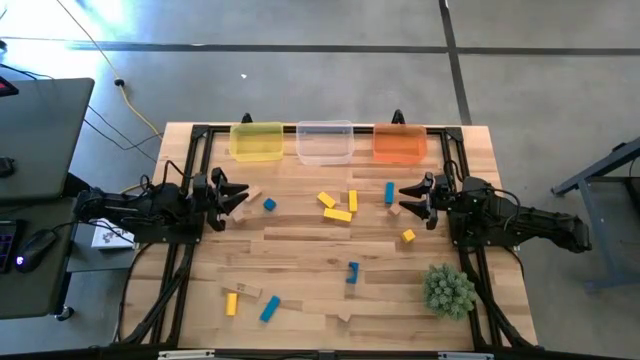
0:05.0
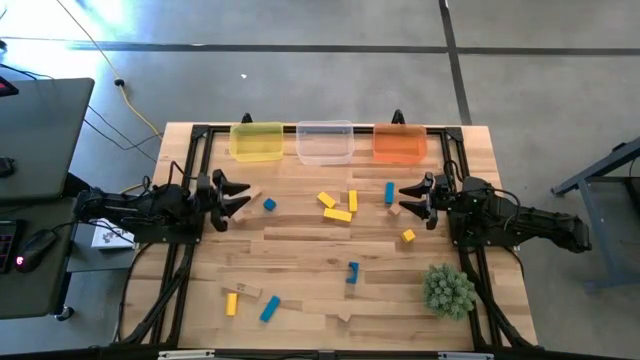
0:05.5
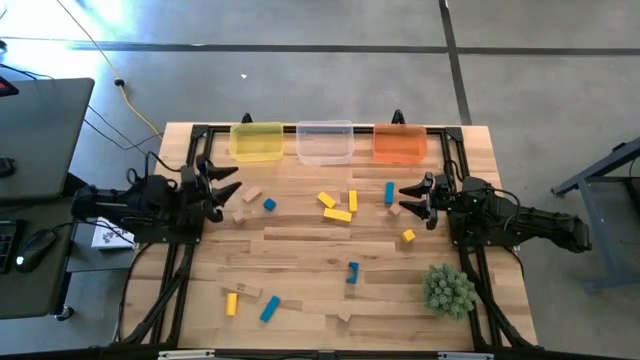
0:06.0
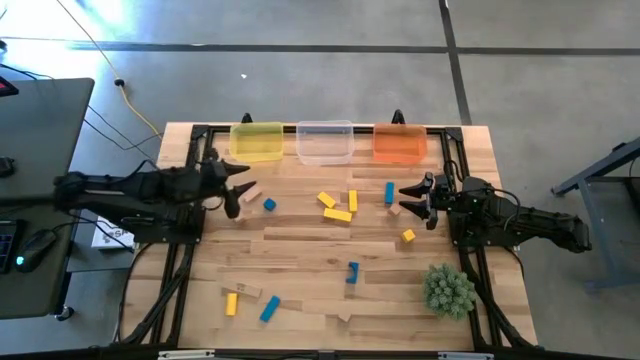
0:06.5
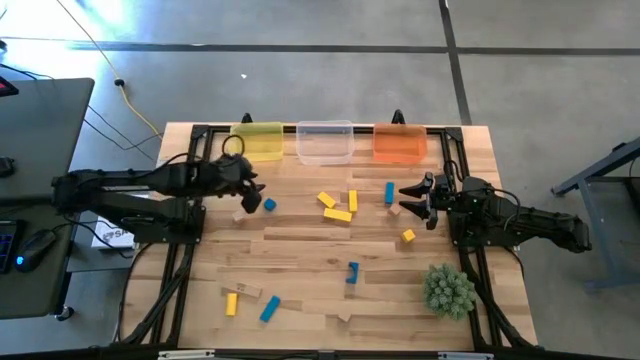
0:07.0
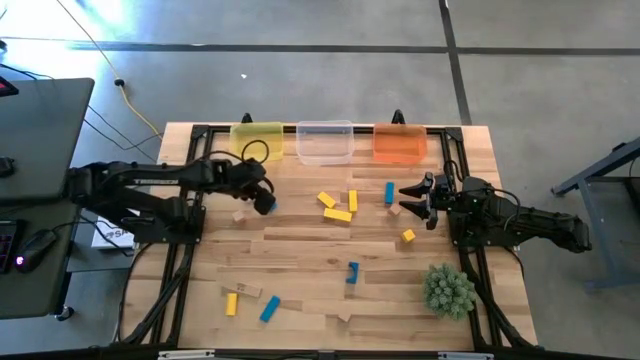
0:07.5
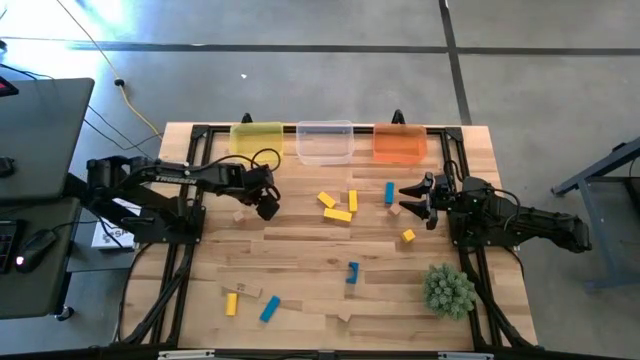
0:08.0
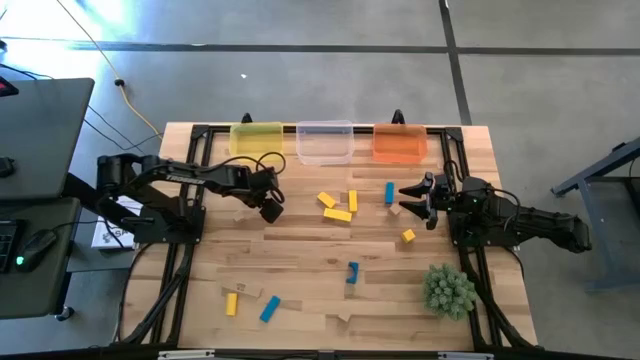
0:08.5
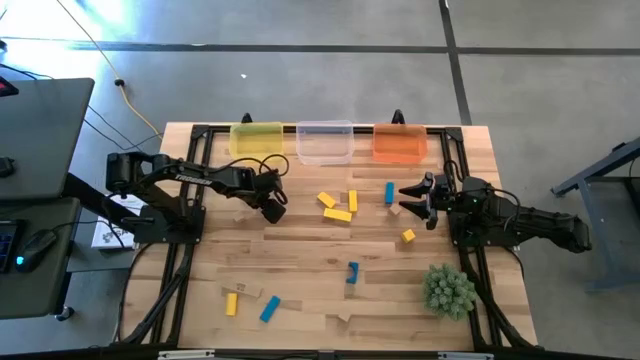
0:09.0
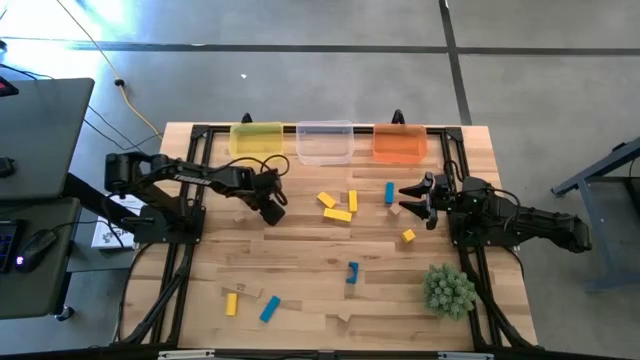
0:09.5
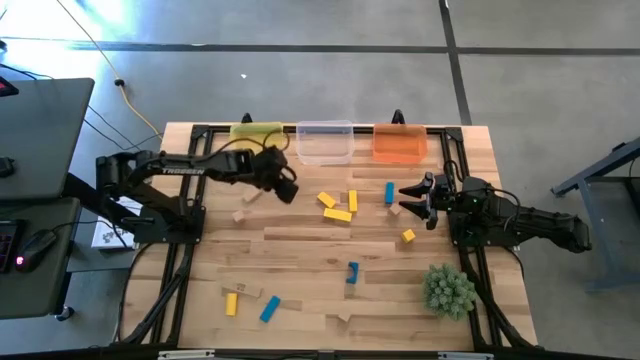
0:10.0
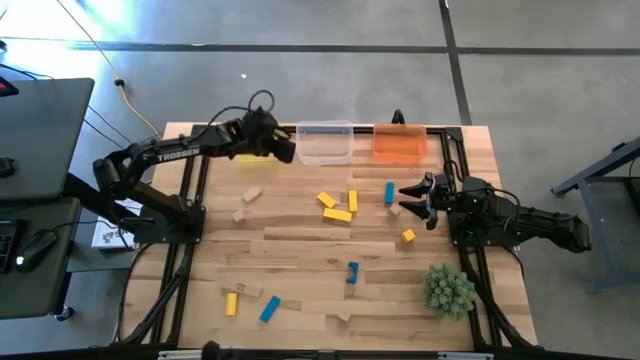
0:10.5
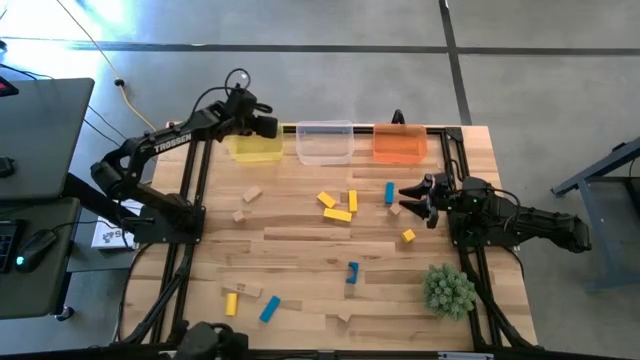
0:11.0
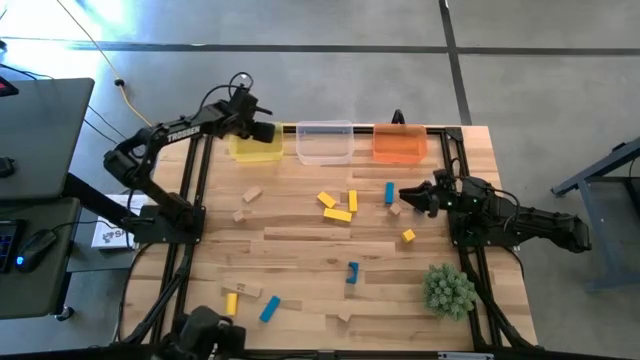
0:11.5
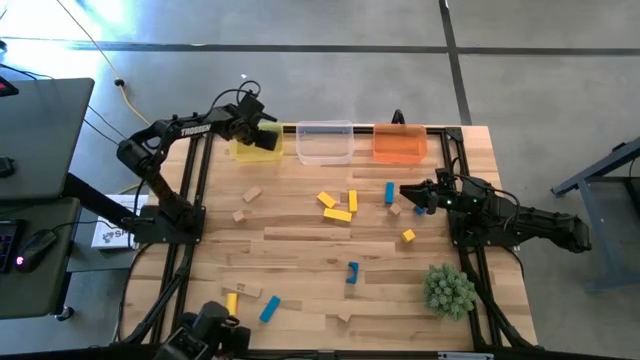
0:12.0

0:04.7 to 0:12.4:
Task: Sort & place blocks by color
Put the blue block into the yellow bin

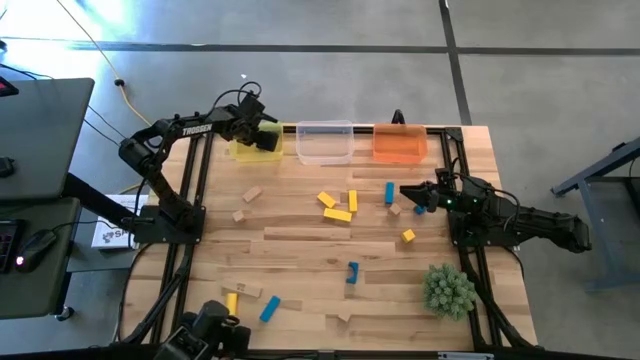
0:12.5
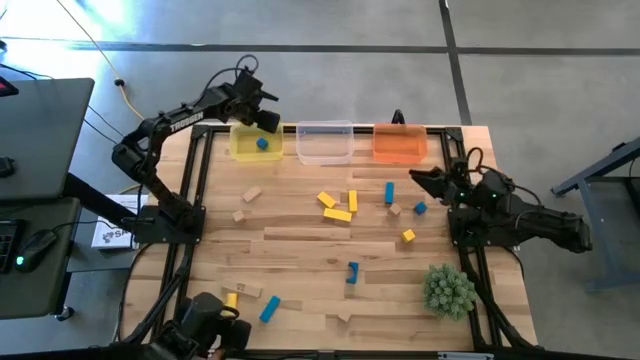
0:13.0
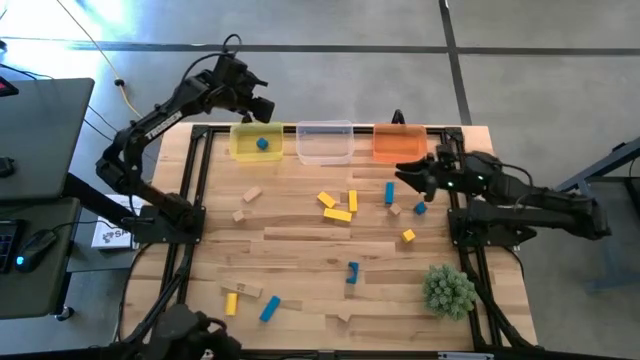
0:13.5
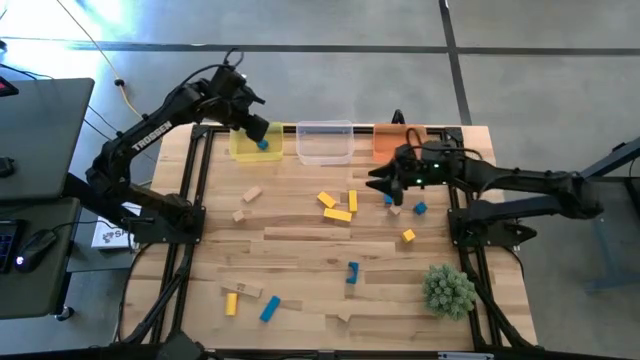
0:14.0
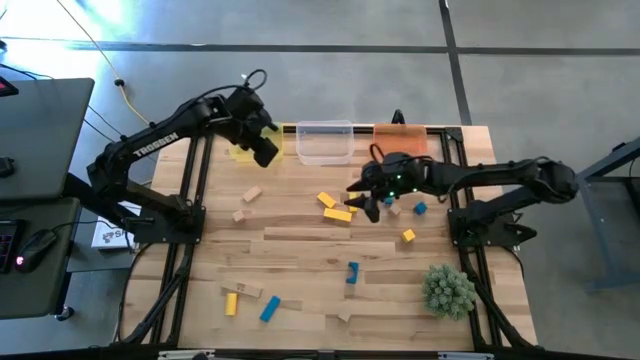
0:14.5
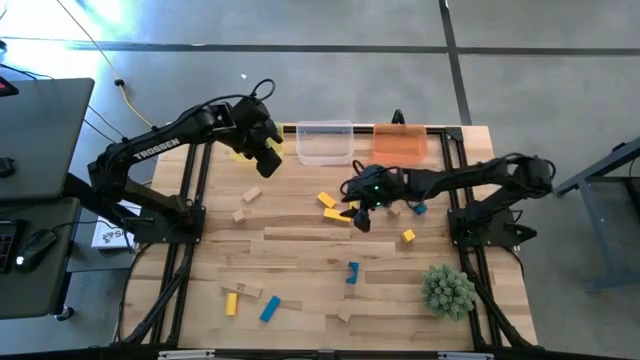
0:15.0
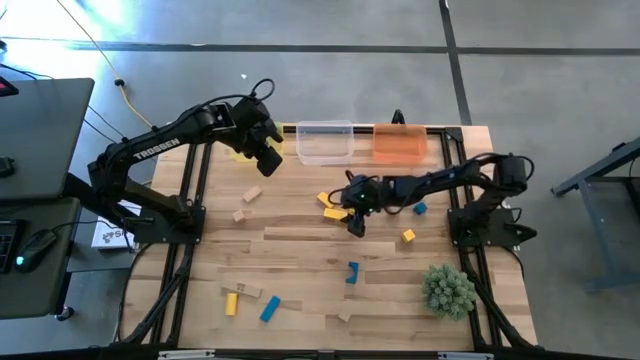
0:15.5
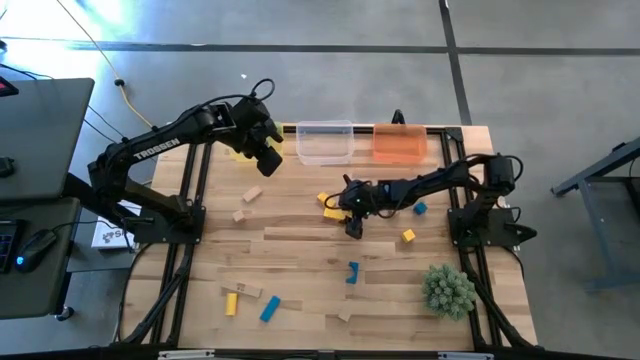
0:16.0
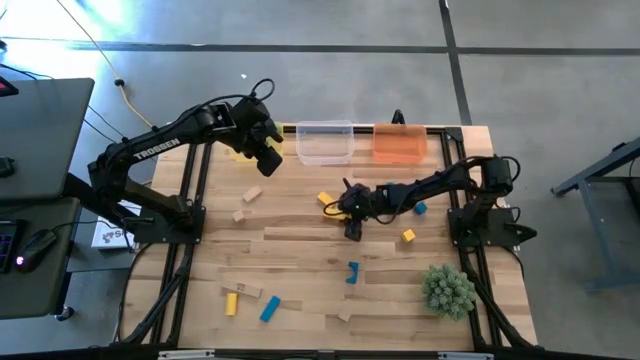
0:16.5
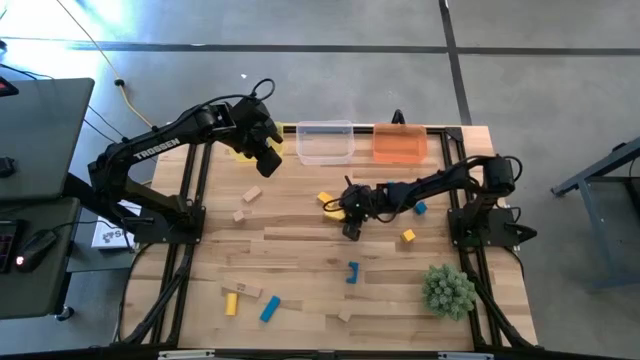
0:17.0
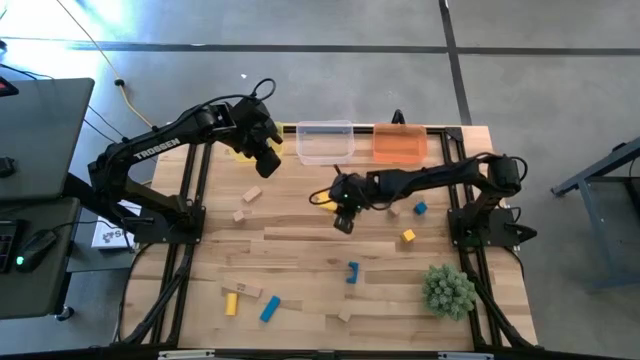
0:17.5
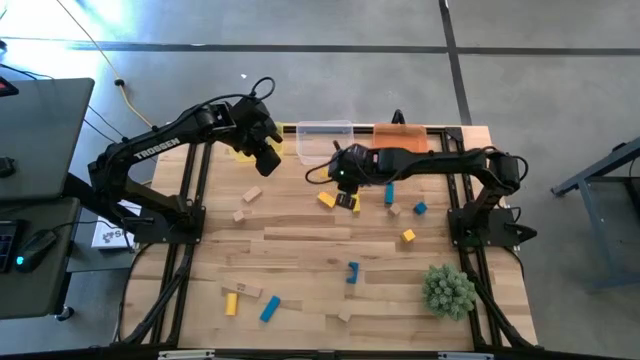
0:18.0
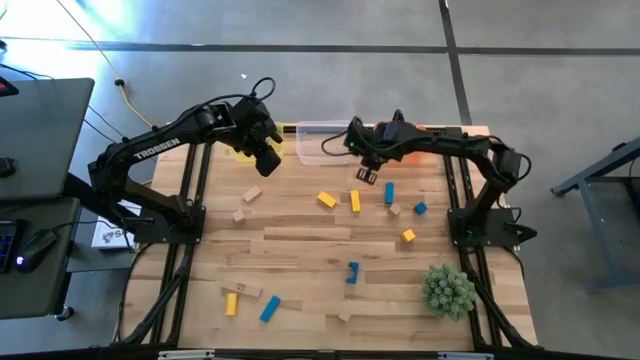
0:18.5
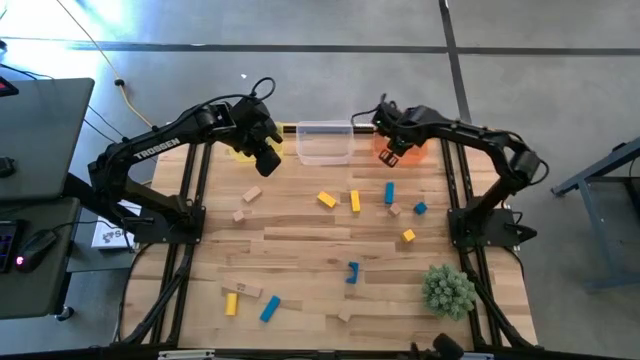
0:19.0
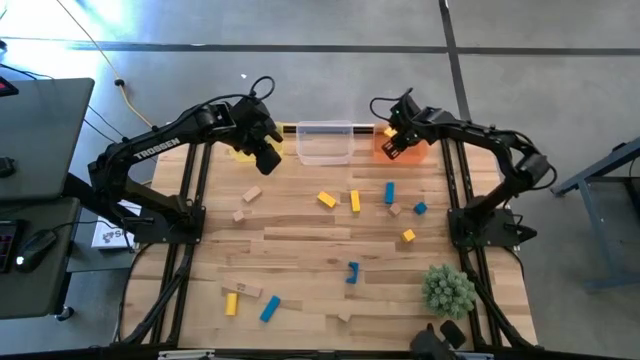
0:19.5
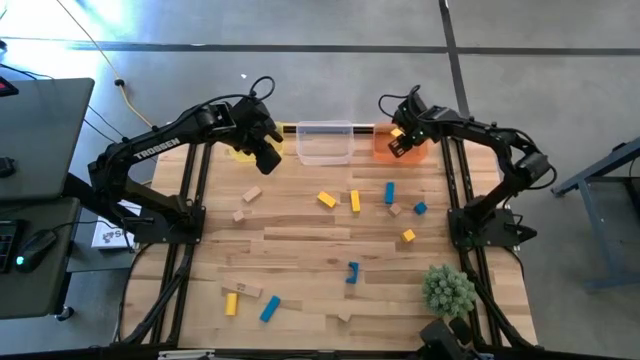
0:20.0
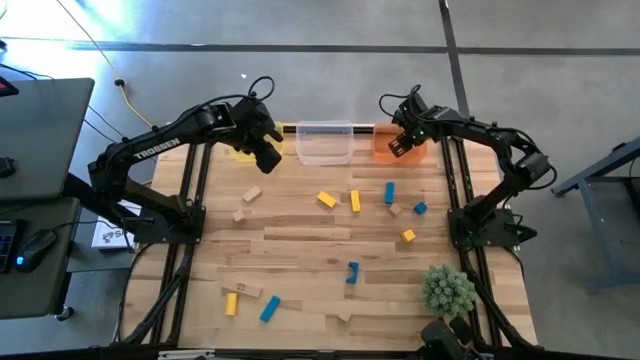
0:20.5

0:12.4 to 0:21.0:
Put the yellow block into the orange bin

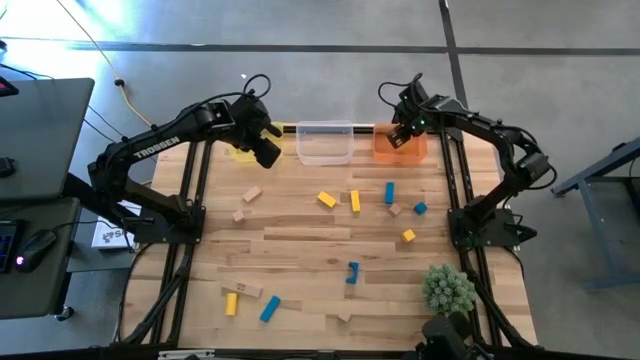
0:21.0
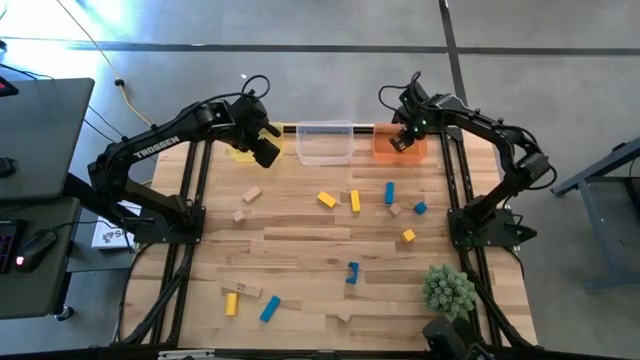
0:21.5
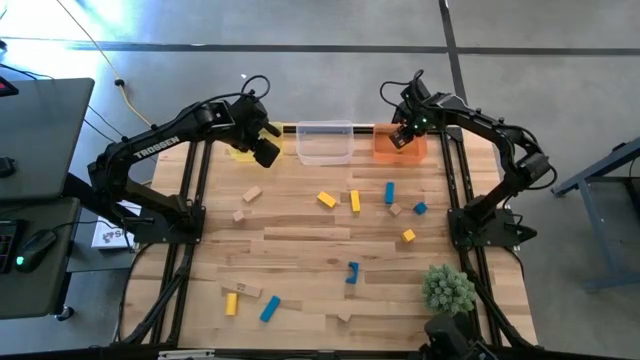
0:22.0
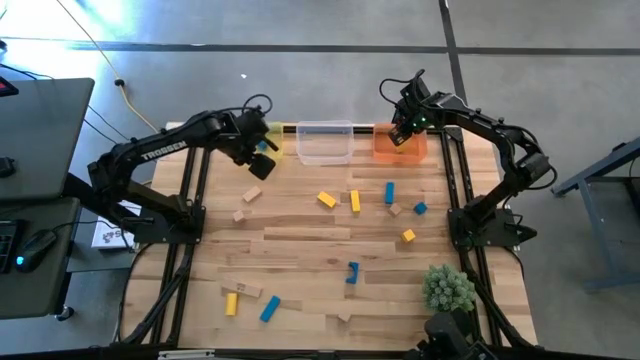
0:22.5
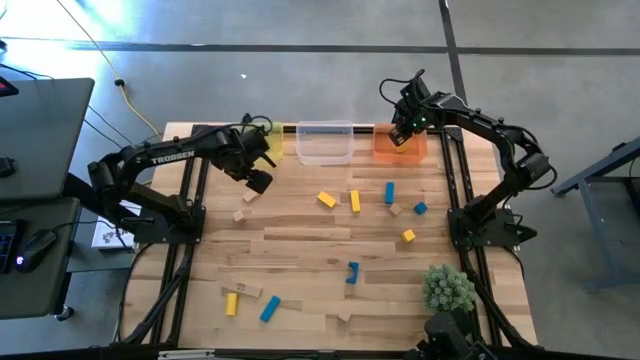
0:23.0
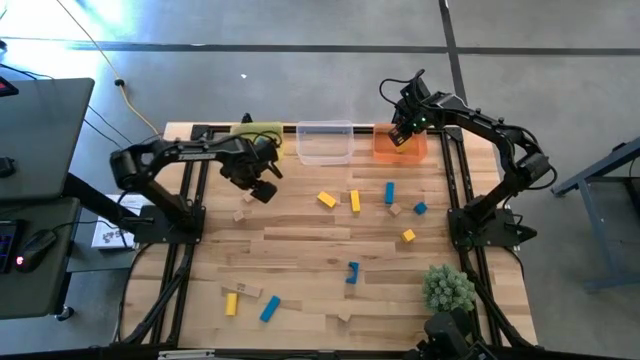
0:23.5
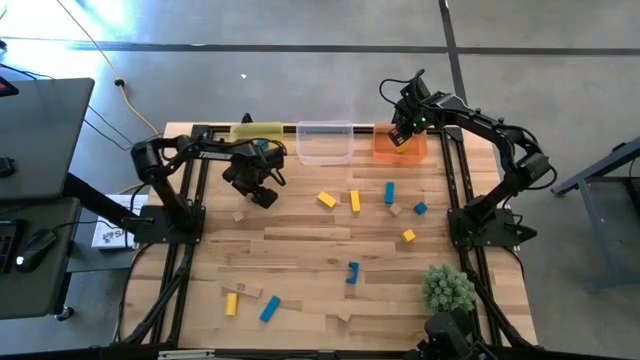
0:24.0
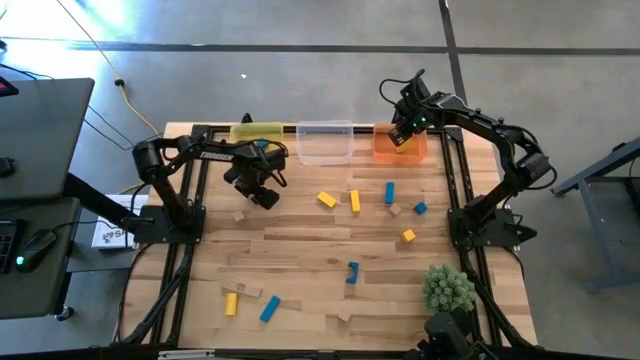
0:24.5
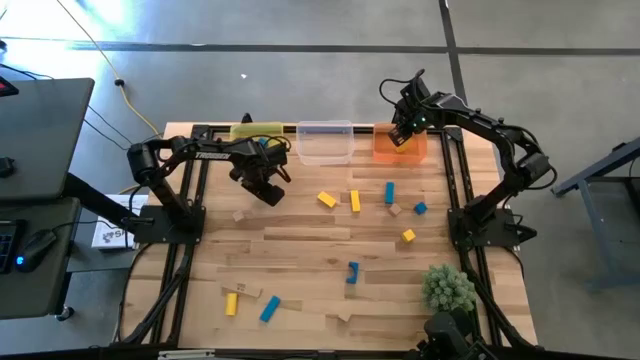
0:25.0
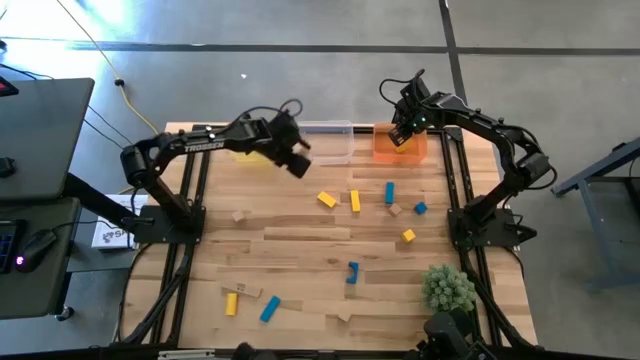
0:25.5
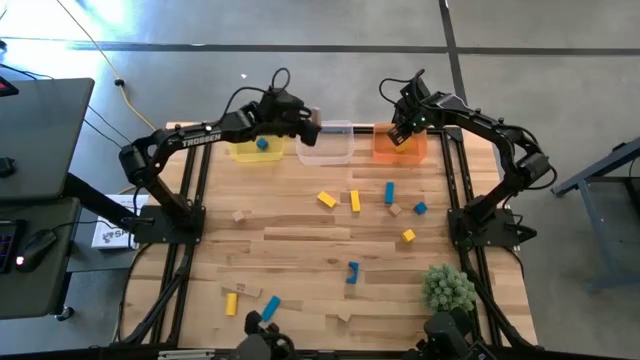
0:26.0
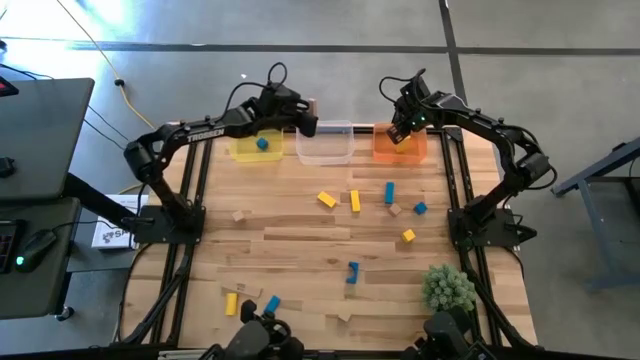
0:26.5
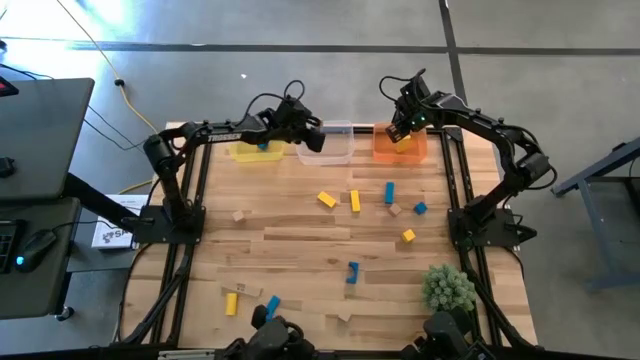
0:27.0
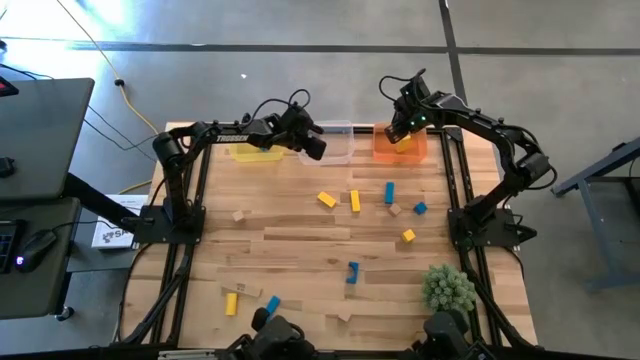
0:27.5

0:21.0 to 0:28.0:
Put the light brown block into the transparent bin
